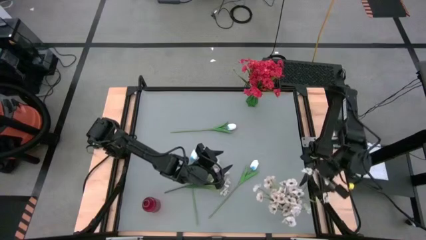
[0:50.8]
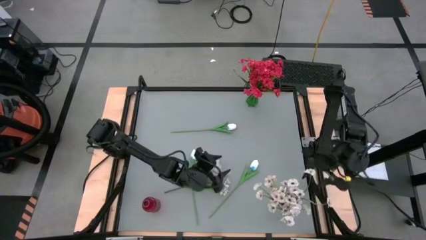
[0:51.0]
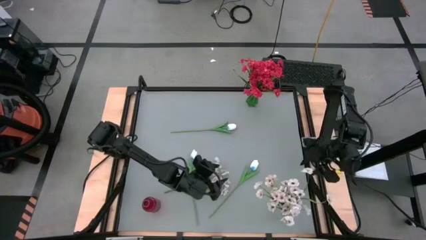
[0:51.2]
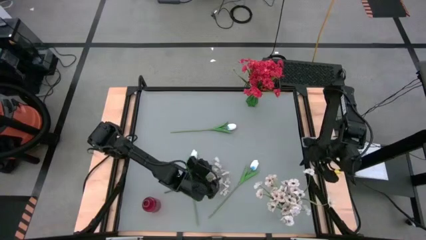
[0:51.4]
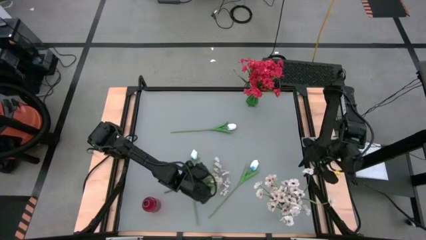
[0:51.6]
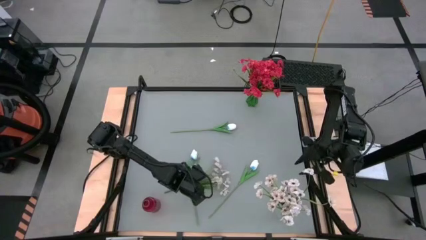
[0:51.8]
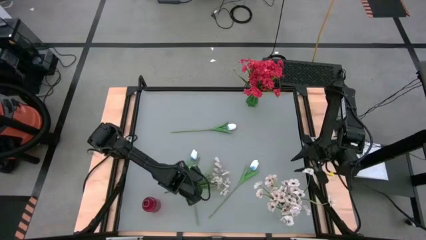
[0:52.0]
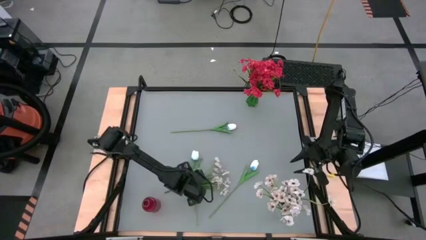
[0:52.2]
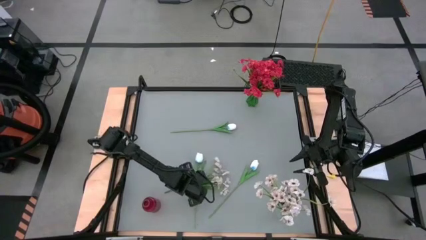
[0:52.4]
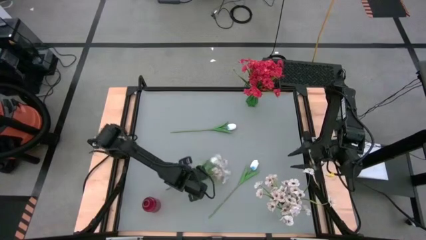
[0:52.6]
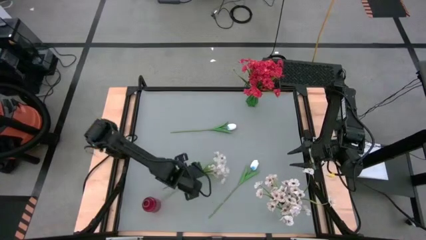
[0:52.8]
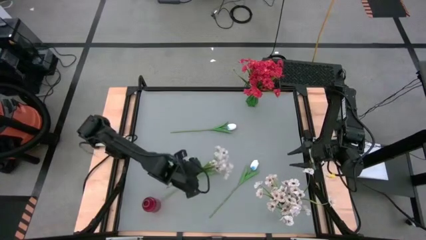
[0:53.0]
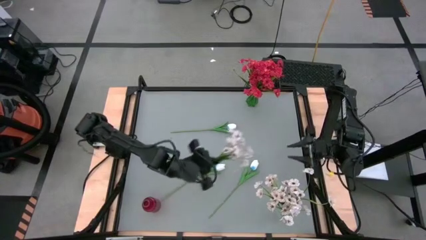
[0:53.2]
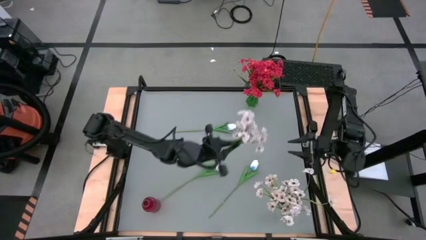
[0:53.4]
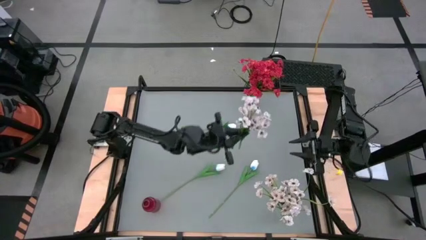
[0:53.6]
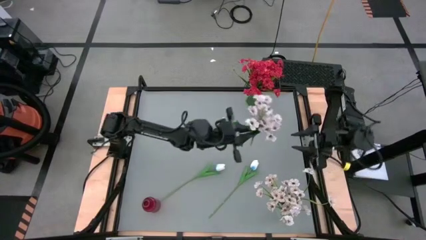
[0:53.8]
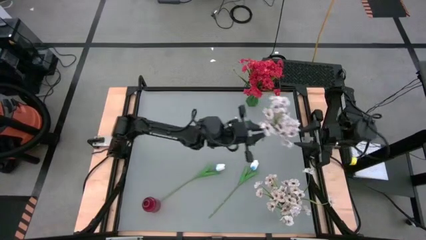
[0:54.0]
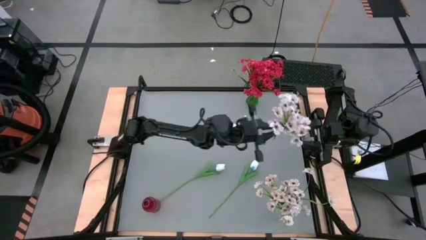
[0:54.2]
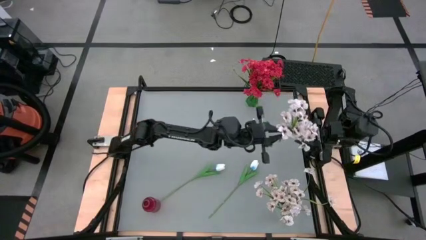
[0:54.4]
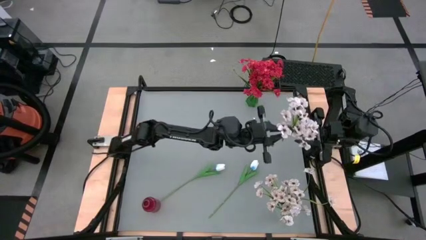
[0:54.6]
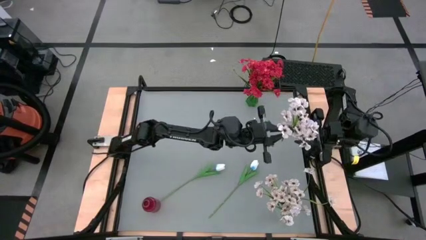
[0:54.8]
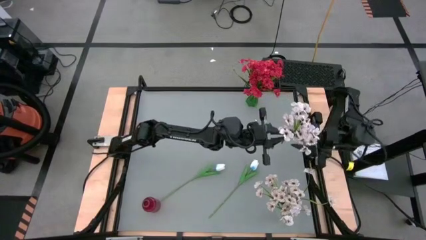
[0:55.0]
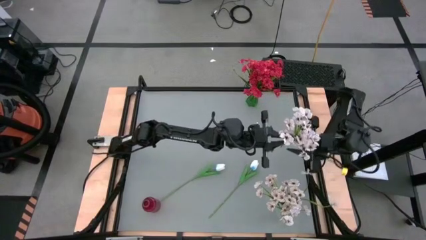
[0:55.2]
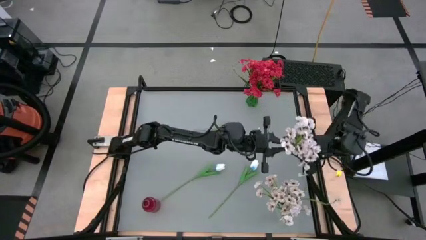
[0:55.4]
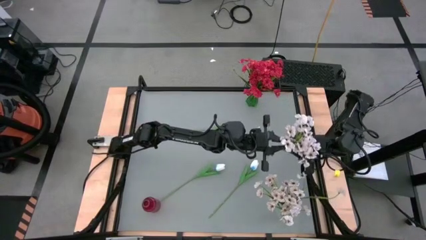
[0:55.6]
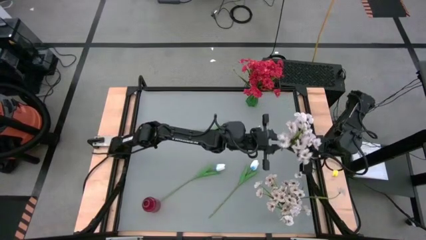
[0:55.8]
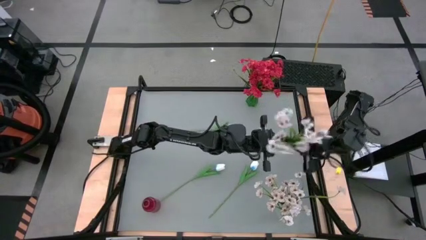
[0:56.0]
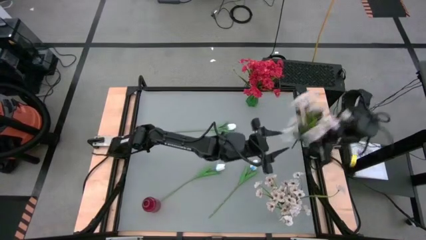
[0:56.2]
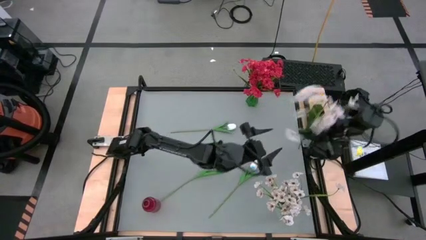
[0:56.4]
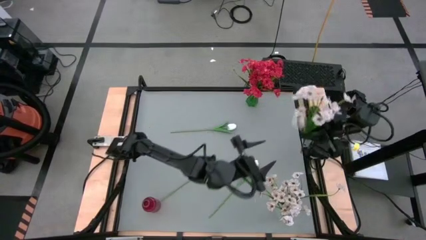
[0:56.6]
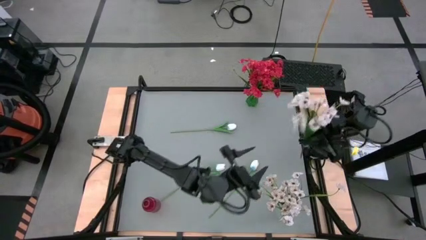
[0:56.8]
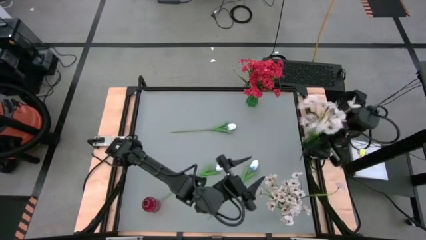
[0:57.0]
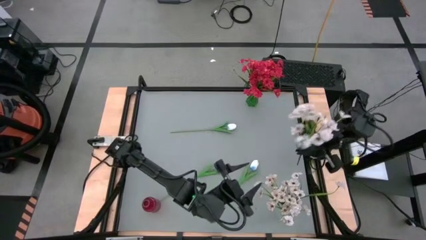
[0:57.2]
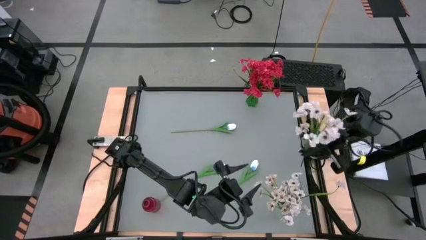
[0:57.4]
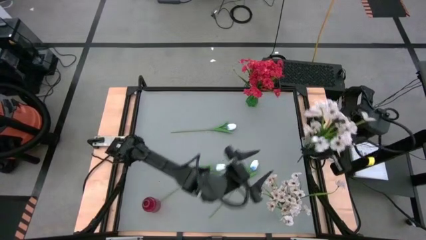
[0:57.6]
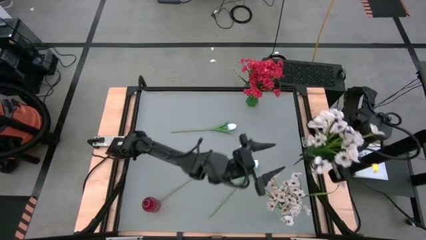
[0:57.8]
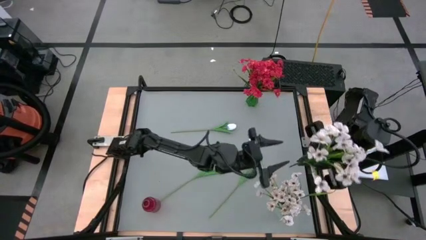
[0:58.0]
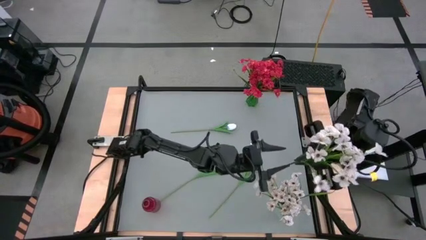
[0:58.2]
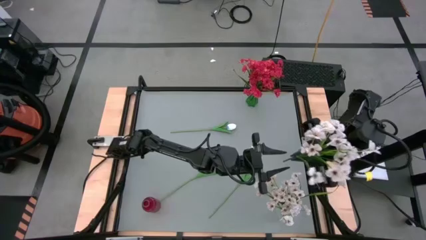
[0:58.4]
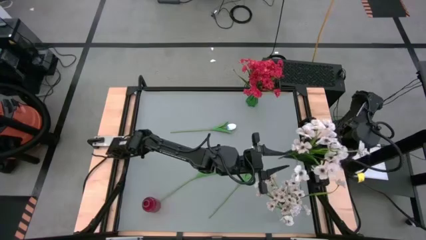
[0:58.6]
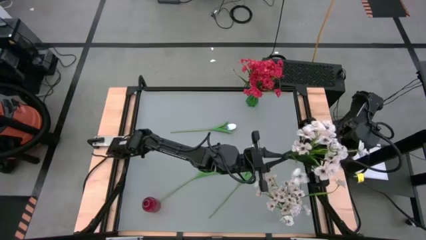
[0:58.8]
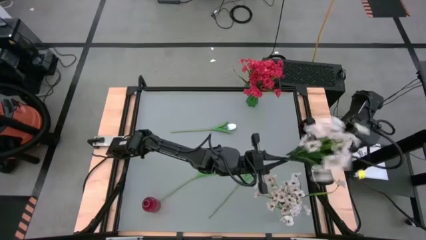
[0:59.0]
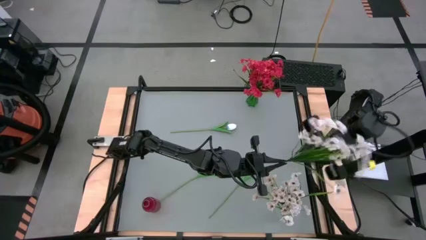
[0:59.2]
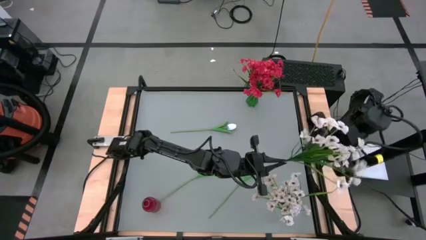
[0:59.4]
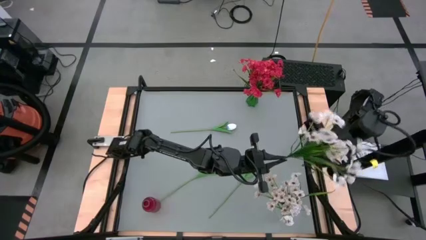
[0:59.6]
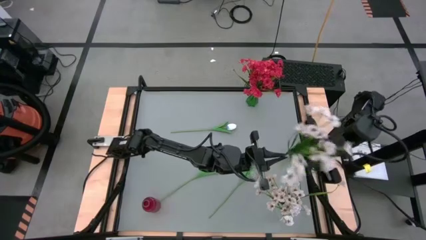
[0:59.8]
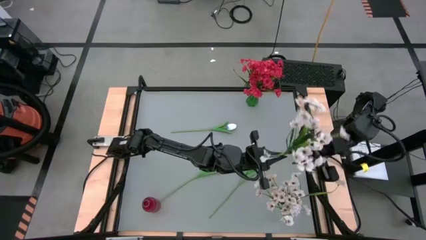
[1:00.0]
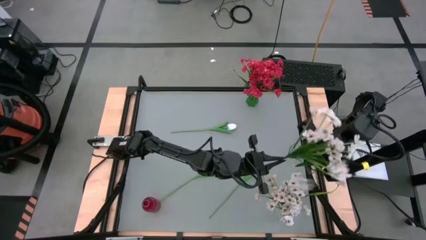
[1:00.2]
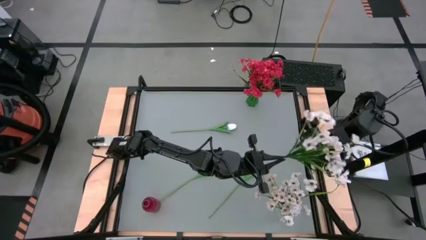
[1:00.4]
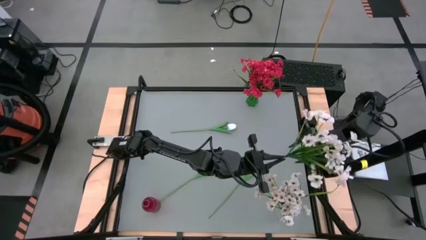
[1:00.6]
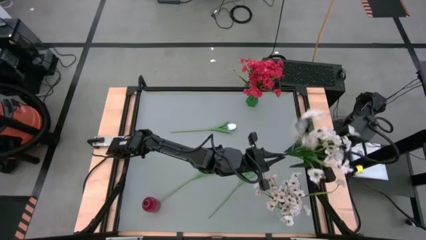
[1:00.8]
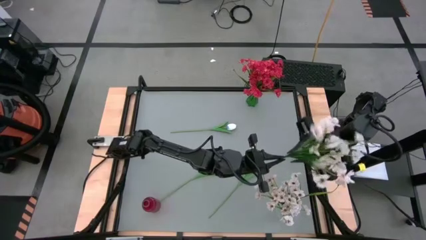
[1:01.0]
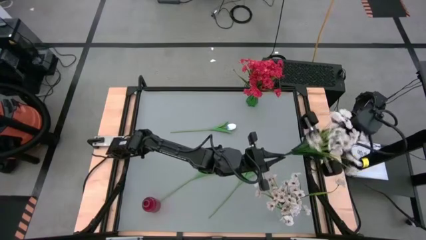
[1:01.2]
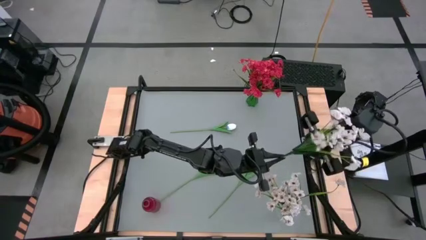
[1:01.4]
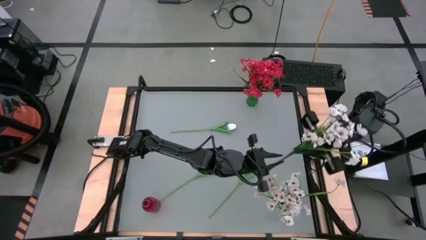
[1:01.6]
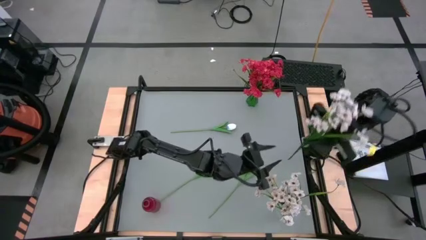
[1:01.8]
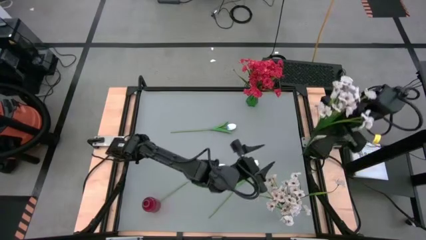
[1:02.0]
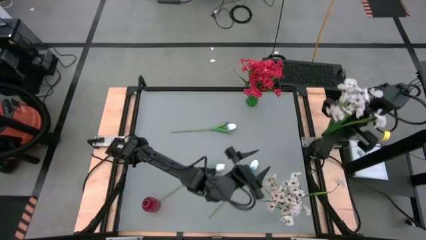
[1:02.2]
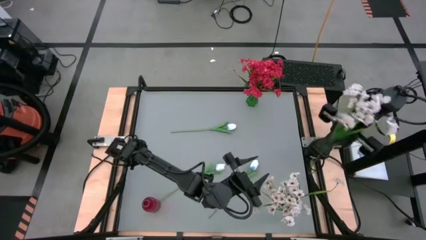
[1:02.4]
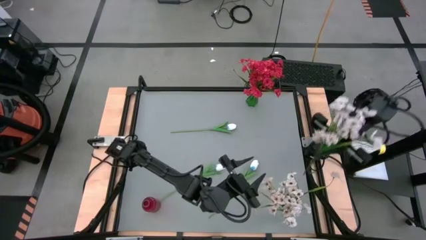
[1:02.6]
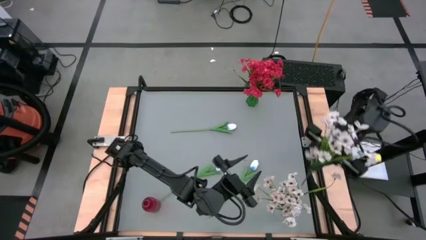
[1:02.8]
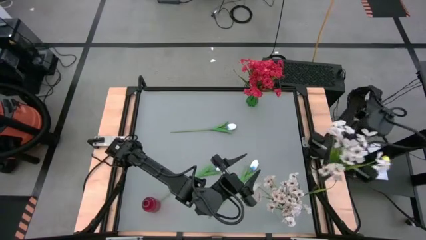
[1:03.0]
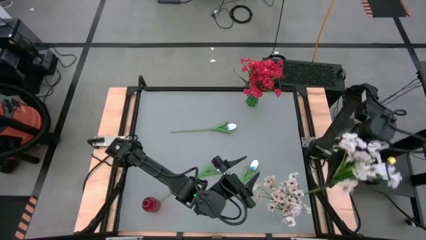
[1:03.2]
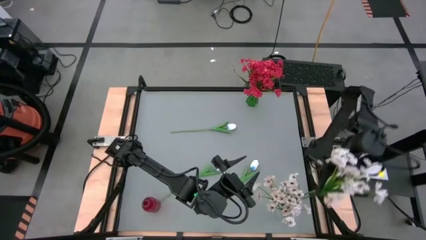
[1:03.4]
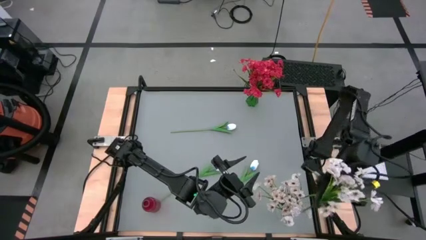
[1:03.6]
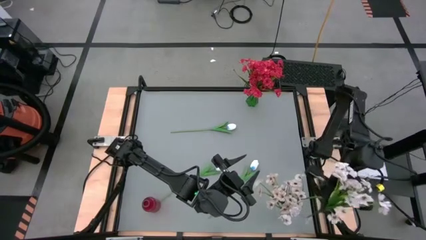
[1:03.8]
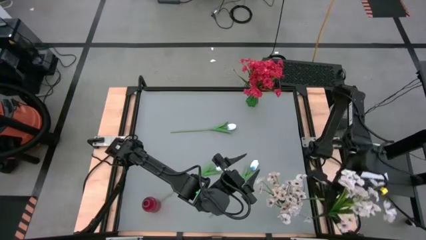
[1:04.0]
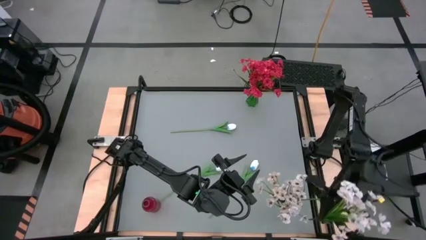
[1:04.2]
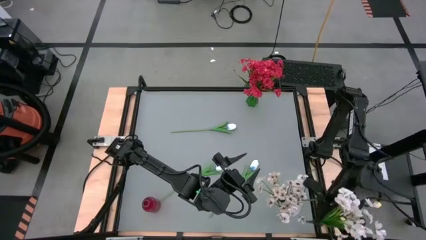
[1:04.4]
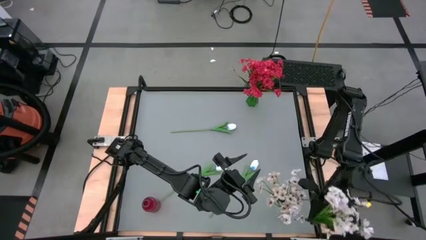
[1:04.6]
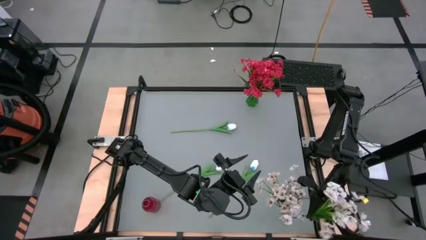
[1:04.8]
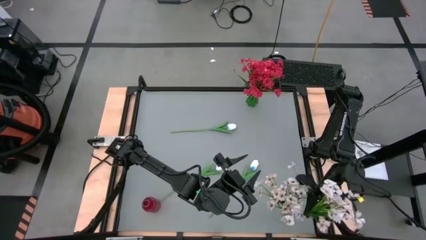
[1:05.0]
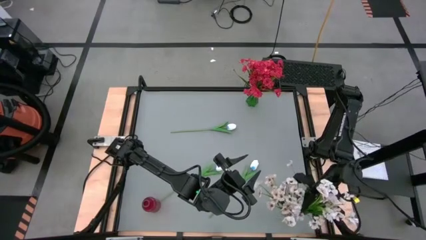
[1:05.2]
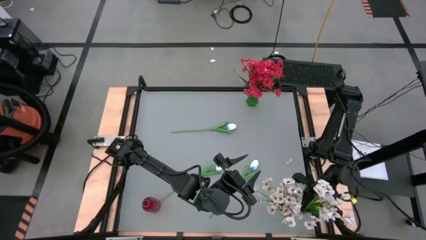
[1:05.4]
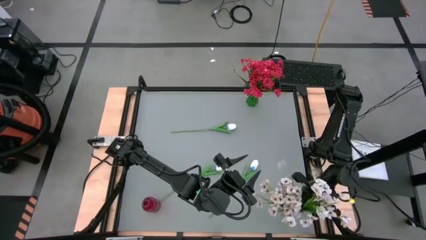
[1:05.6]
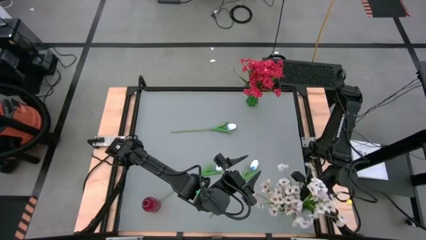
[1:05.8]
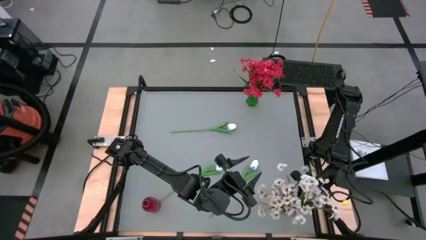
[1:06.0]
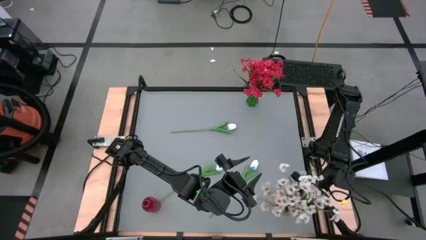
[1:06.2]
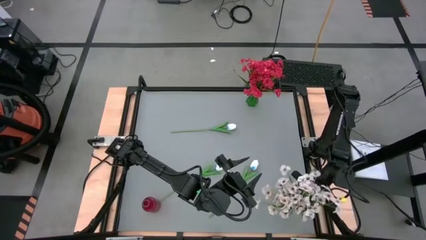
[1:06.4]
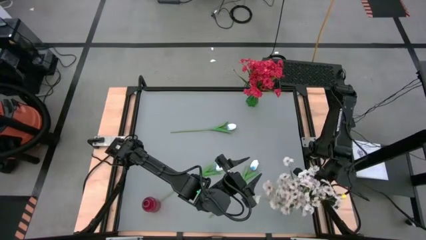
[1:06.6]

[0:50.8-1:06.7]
Task: Sort flowers into vase by color
Put the white flowers into the transparent vase
